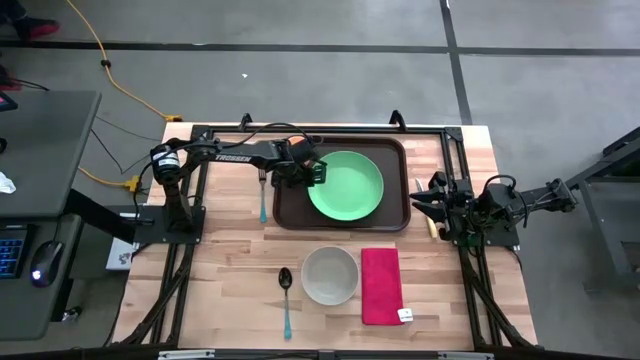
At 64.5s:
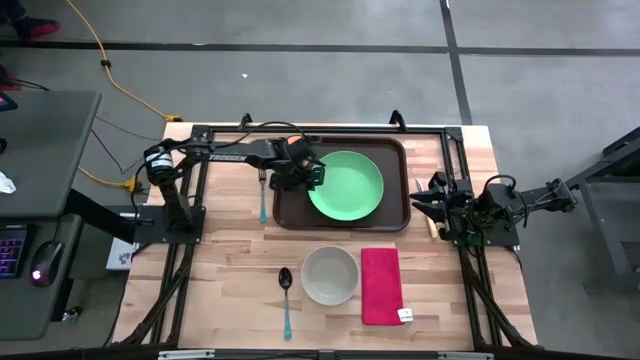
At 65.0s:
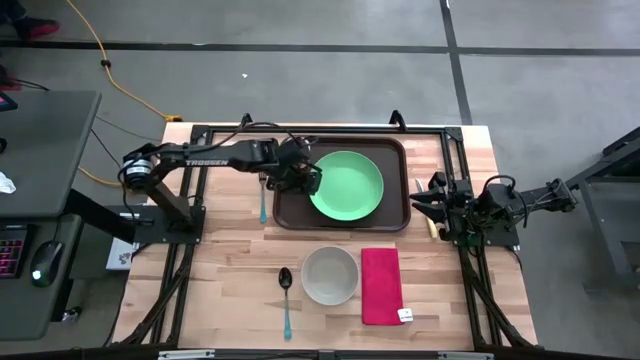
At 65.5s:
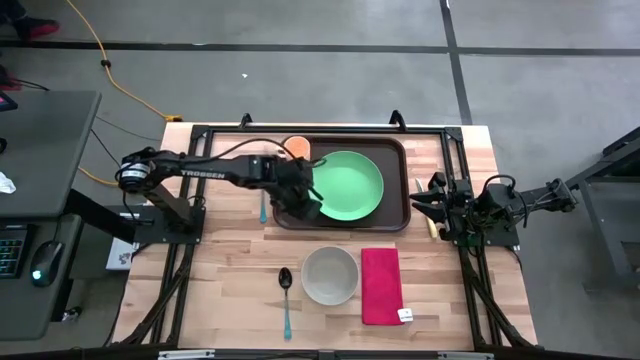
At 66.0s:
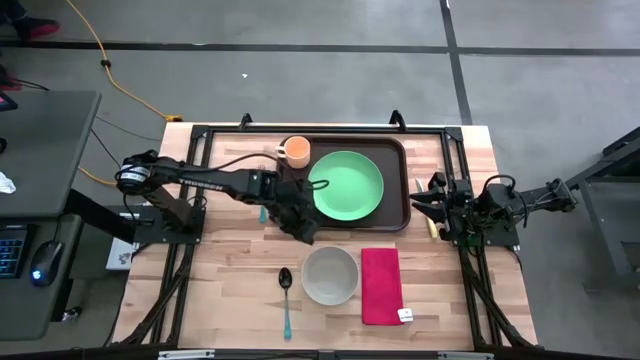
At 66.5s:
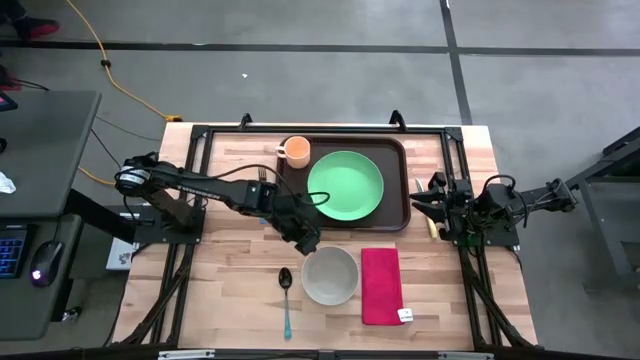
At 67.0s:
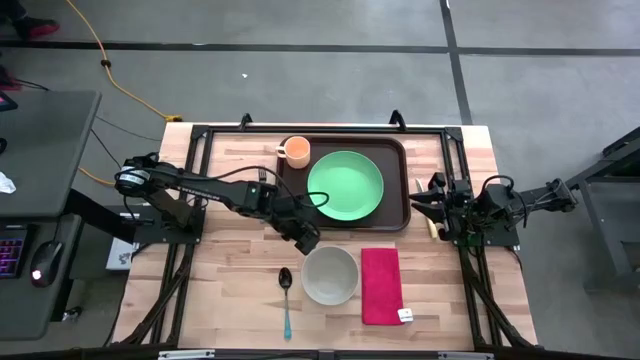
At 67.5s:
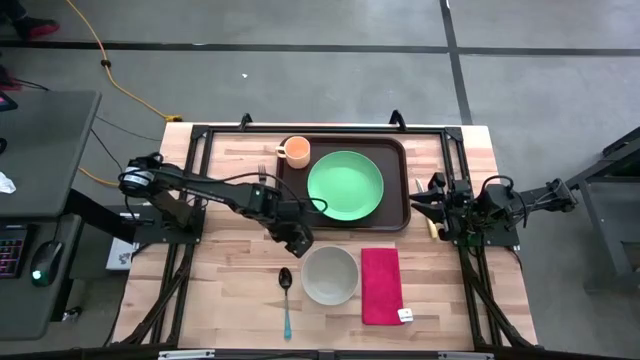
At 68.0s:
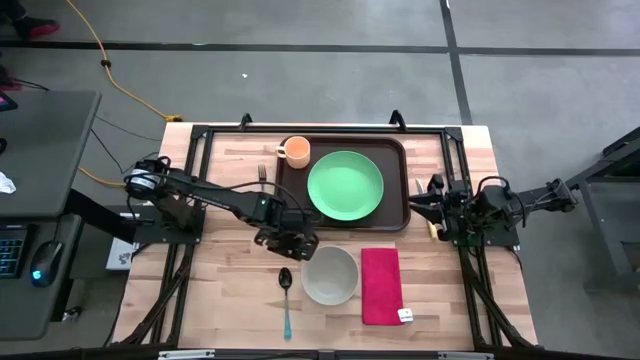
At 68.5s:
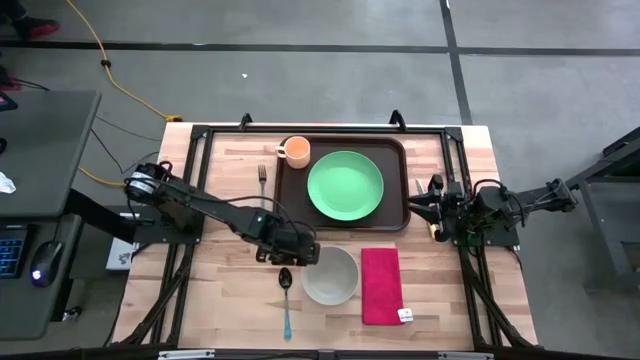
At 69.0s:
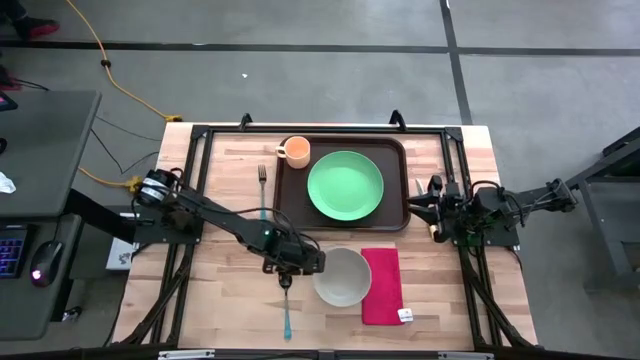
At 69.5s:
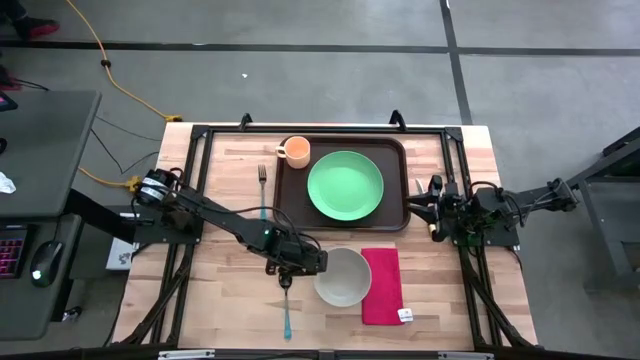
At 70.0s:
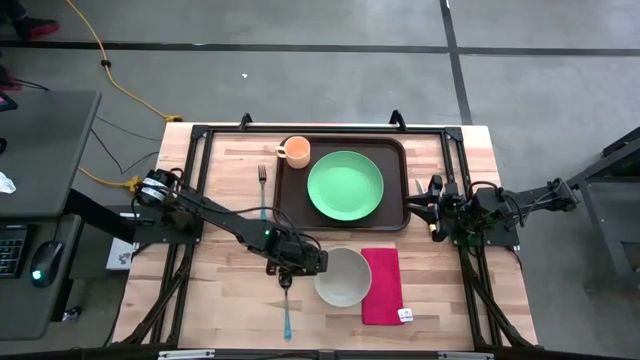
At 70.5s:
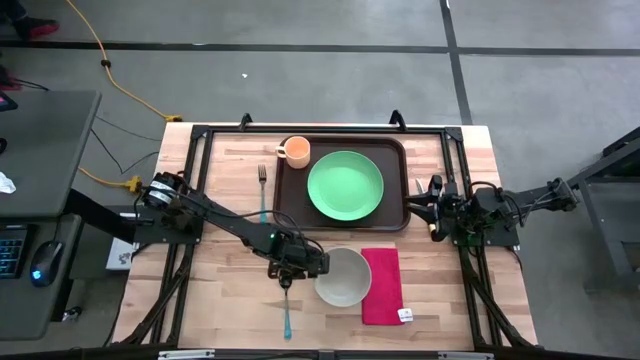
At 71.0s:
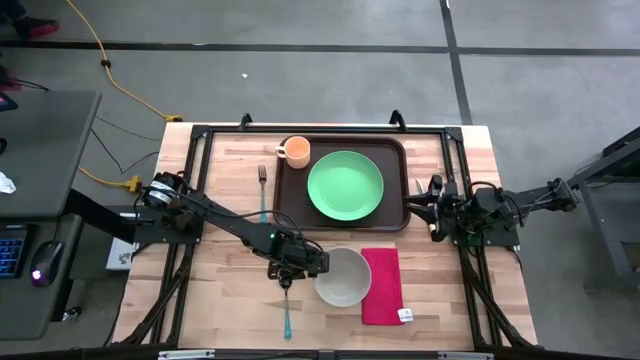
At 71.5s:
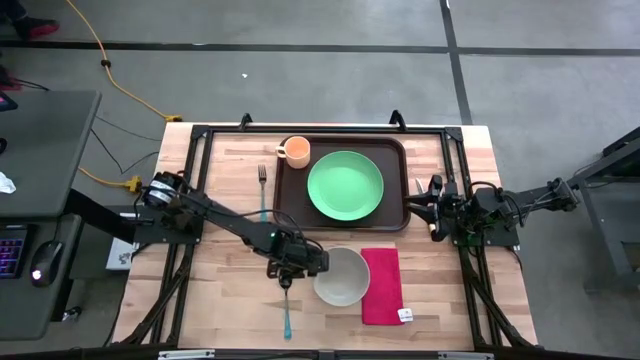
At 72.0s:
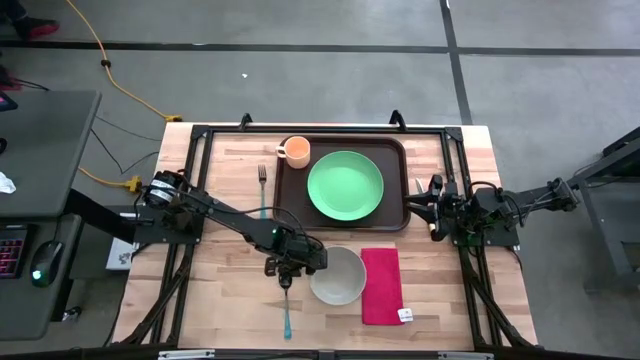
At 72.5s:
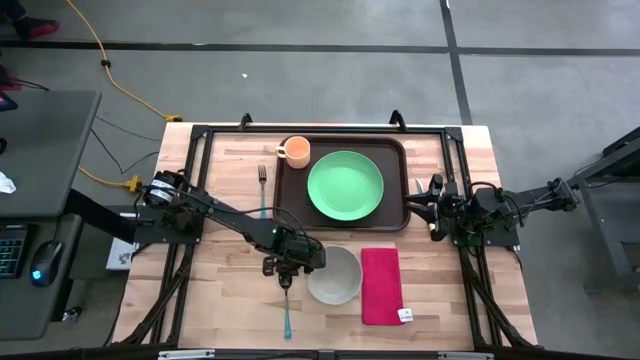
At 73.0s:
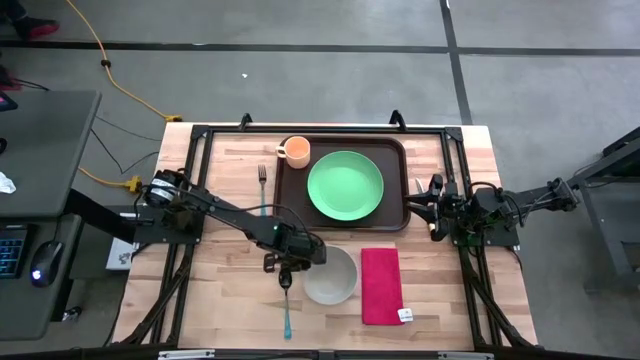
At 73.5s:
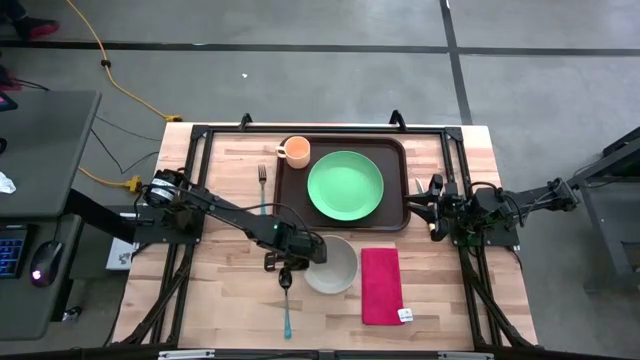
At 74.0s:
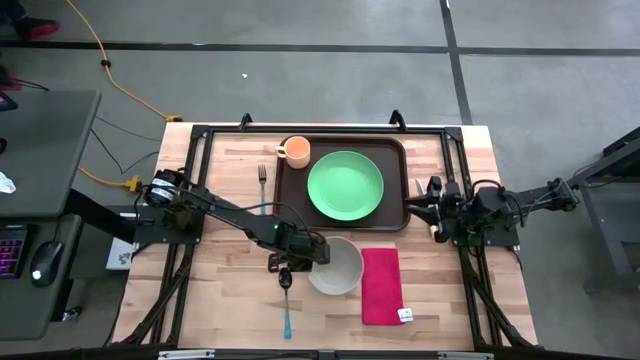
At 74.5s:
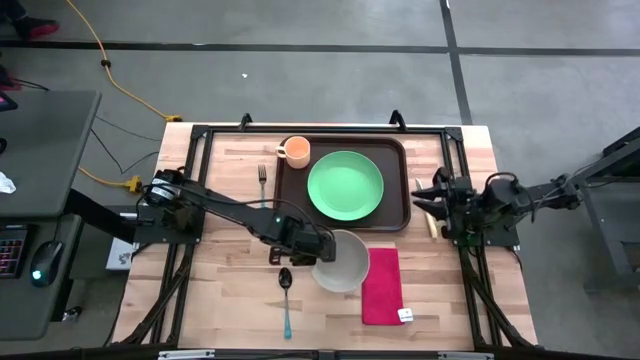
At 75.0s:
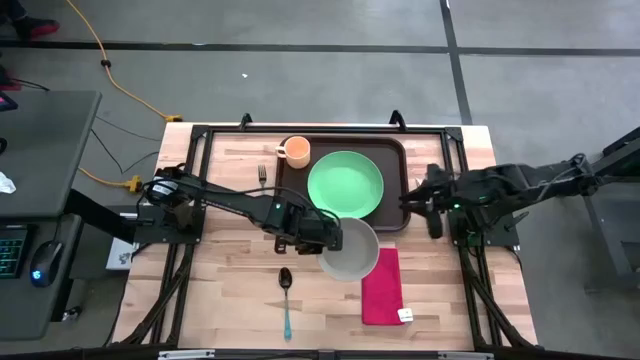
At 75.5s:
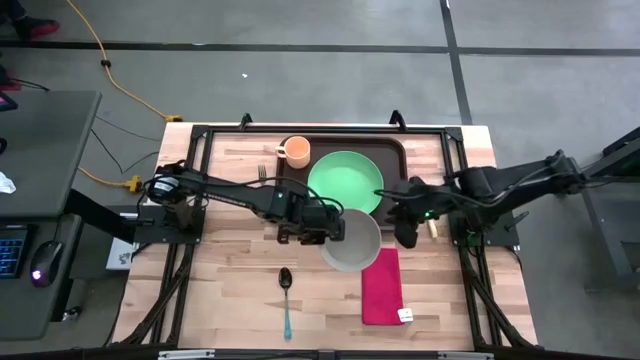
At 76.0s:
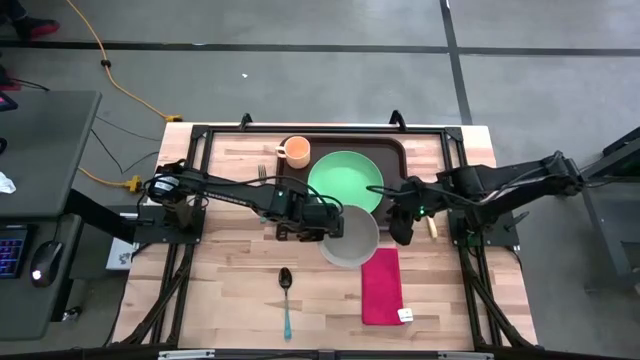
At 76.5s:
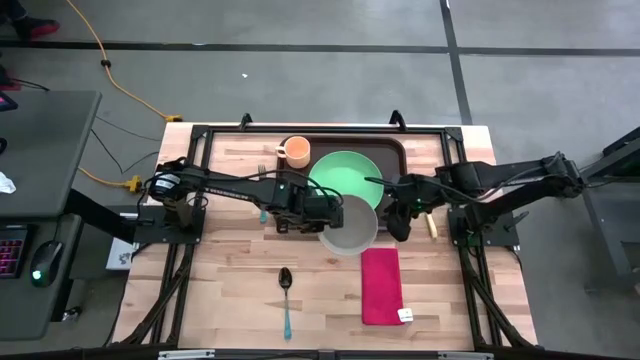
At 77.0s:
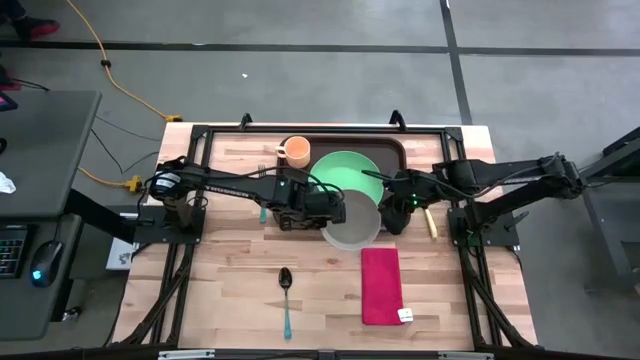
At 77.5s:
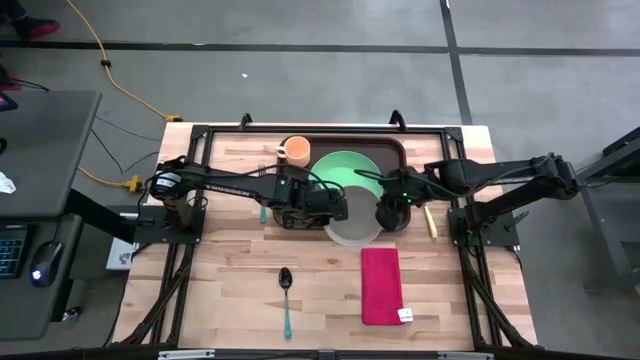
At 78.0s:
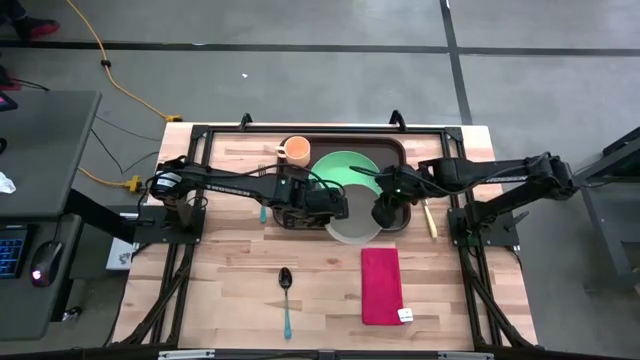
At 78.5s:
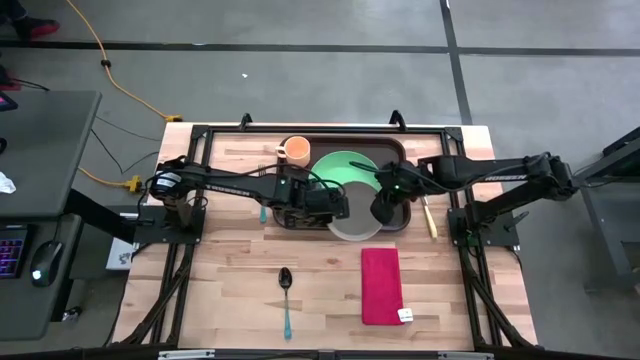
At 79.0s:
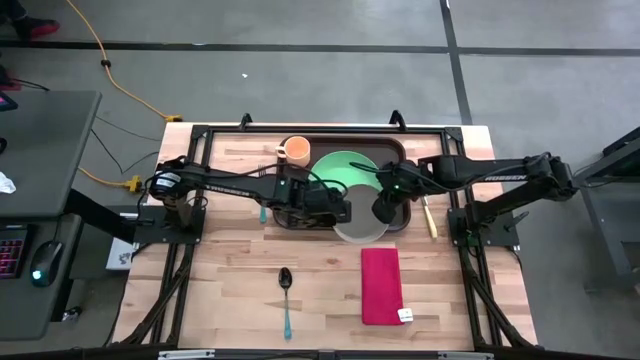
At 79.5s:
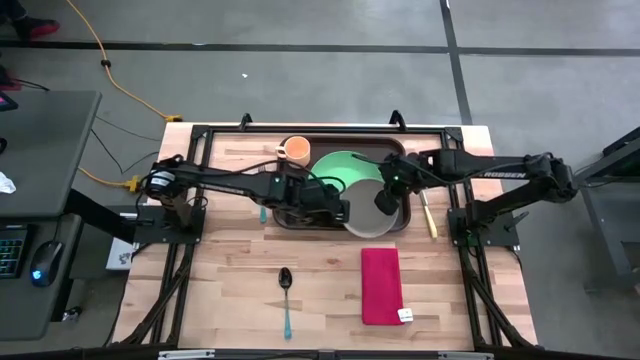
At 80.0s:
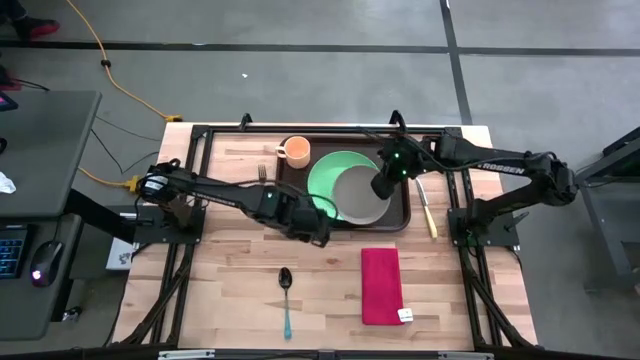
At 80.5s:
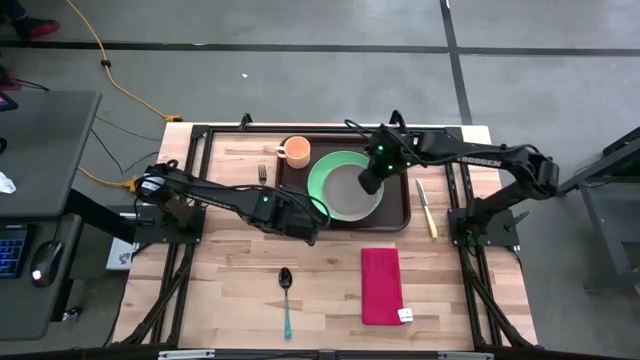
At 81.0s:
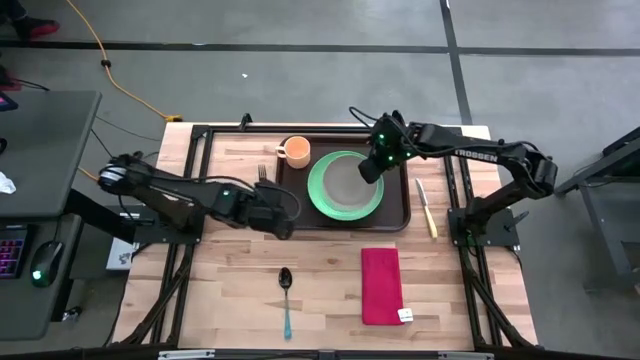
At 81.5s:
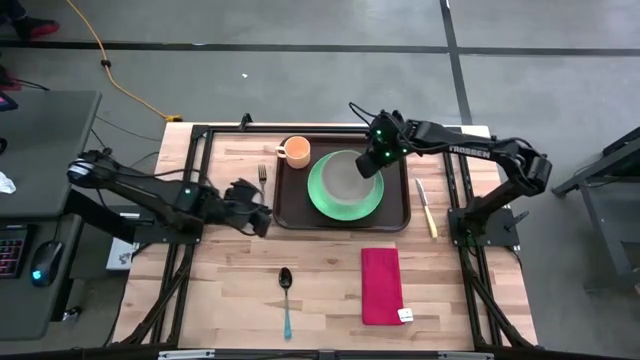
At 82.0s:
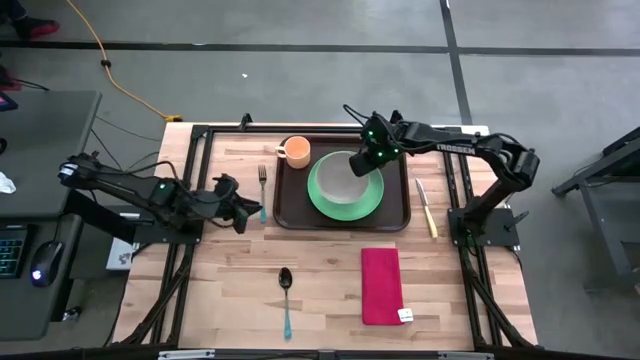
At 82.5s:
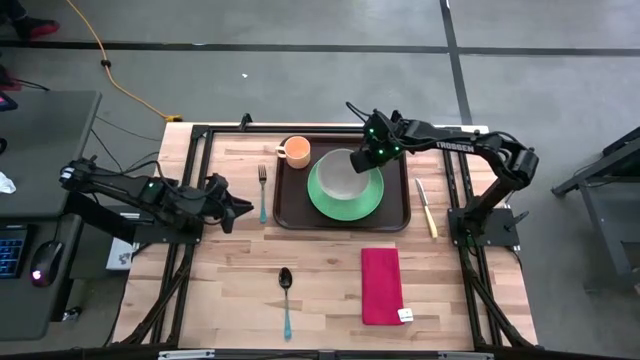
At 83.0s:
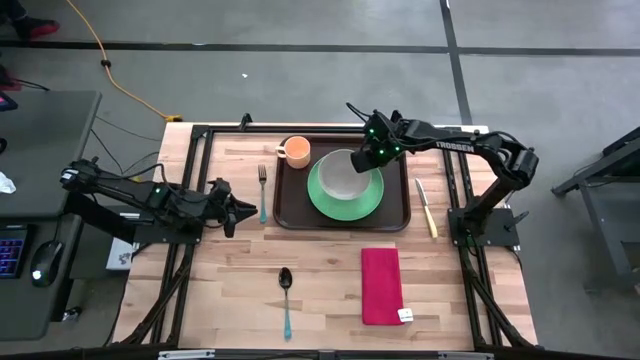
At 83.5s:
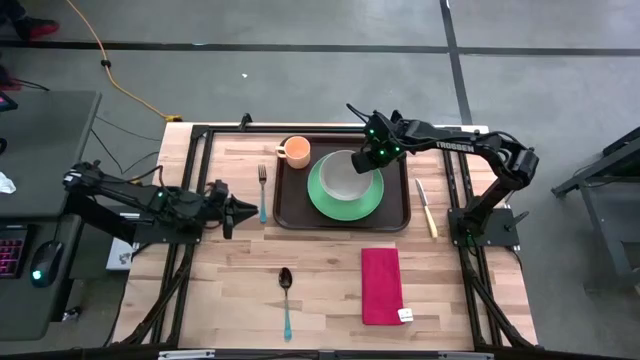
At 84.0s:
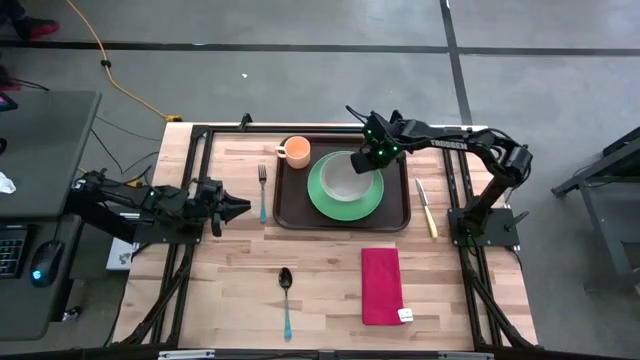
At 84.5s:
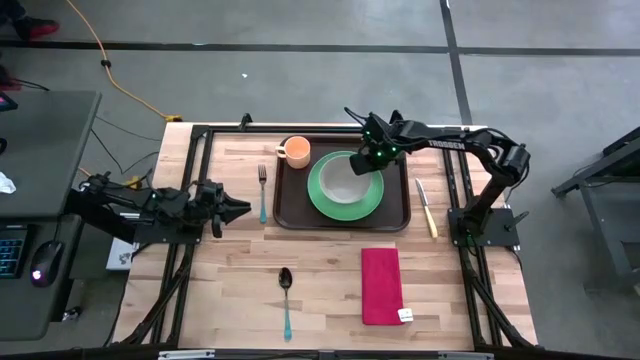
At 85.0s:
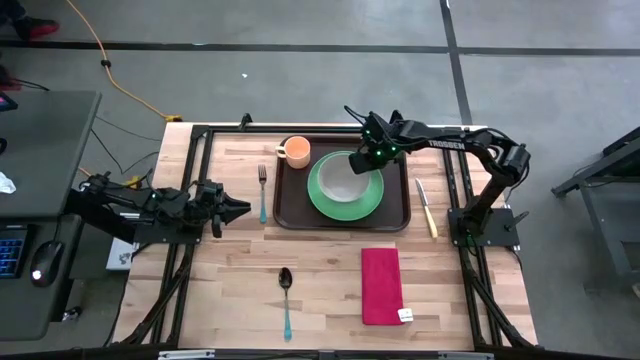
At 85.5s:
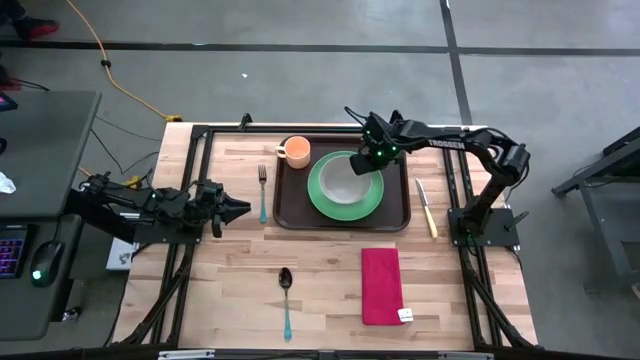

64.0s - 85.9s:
Task: Set up tray
Put the gray bowl on top of the green plate on the brown tray
